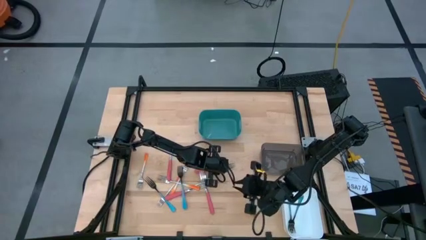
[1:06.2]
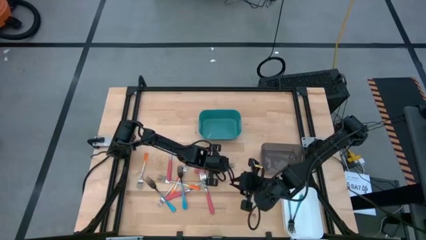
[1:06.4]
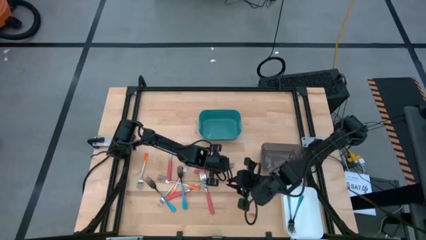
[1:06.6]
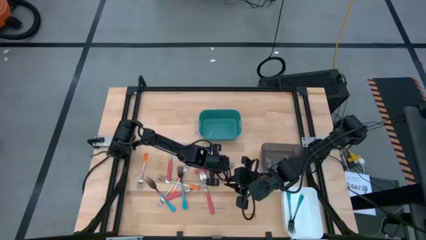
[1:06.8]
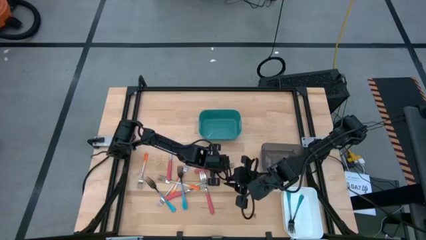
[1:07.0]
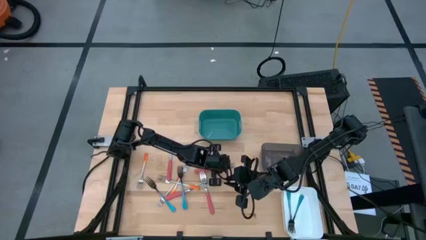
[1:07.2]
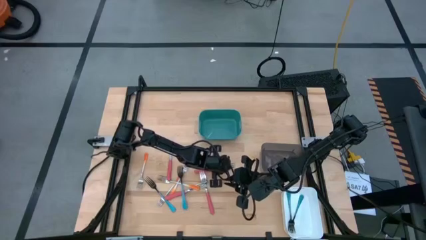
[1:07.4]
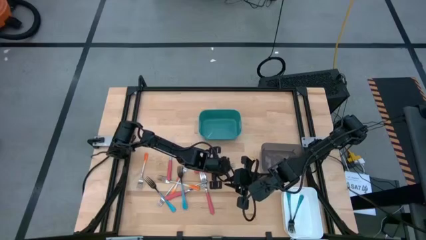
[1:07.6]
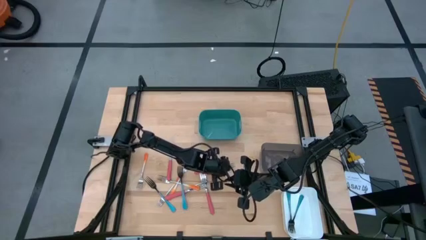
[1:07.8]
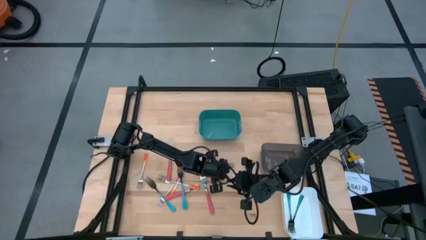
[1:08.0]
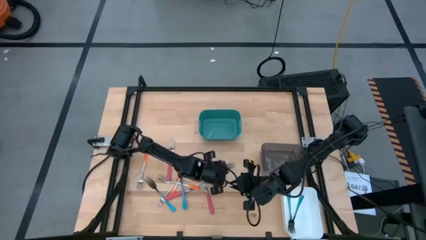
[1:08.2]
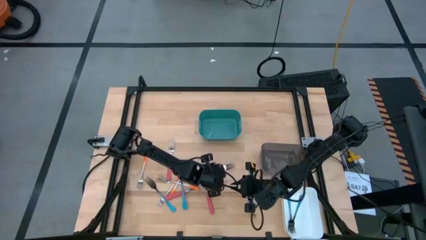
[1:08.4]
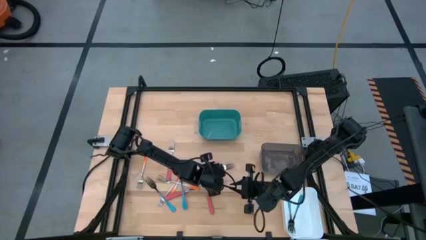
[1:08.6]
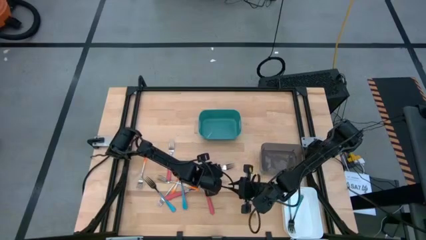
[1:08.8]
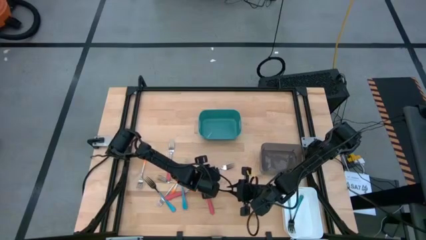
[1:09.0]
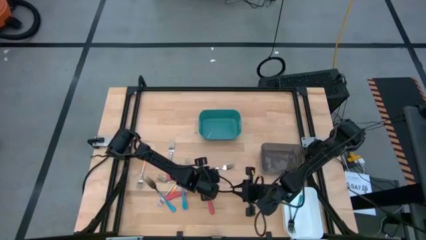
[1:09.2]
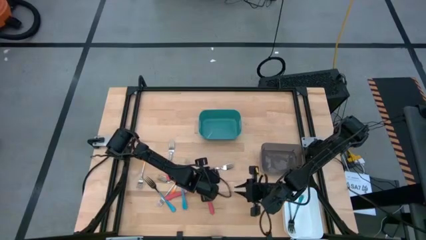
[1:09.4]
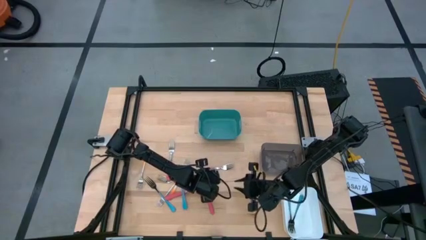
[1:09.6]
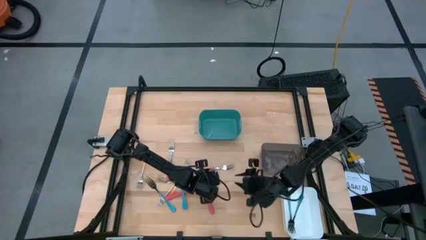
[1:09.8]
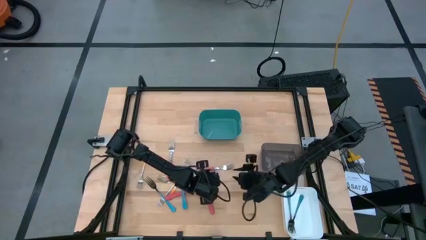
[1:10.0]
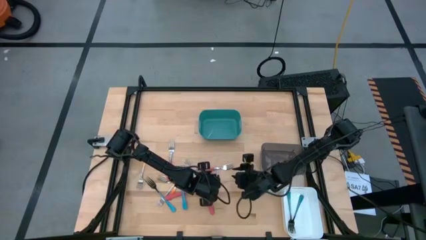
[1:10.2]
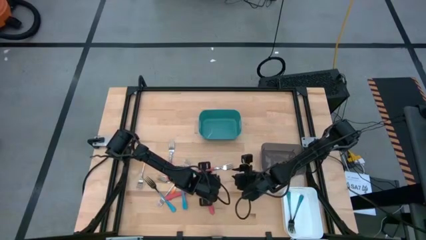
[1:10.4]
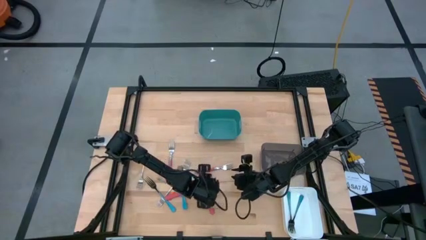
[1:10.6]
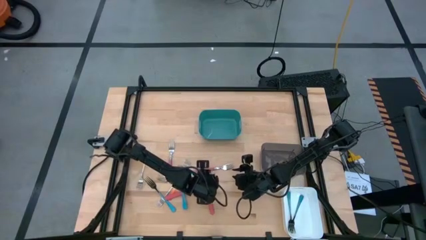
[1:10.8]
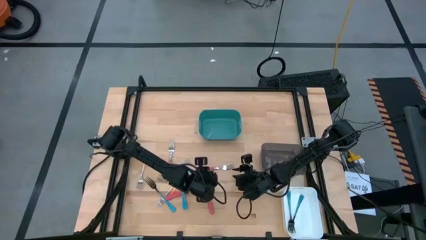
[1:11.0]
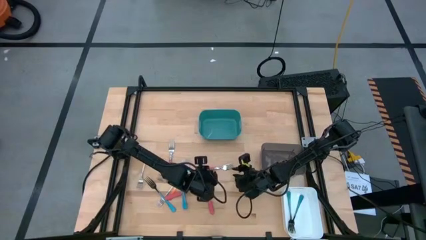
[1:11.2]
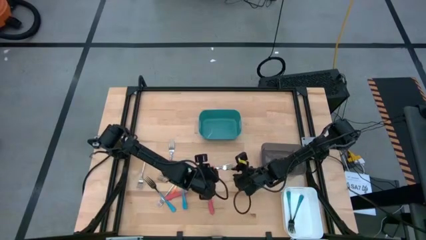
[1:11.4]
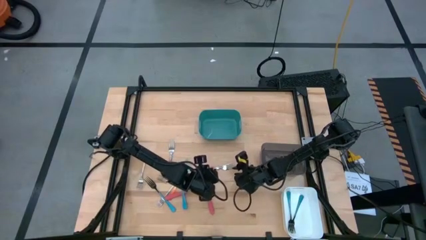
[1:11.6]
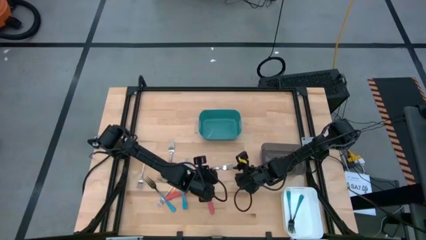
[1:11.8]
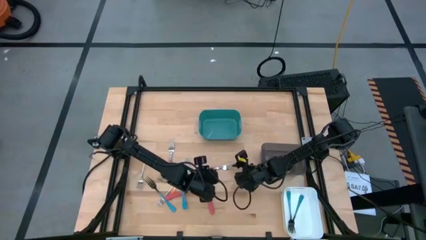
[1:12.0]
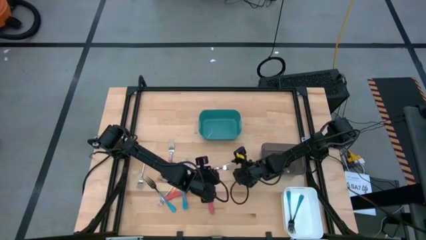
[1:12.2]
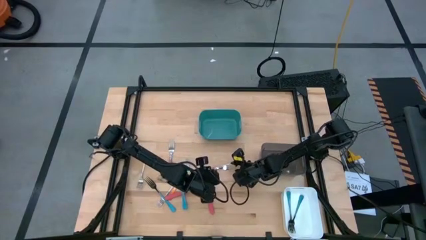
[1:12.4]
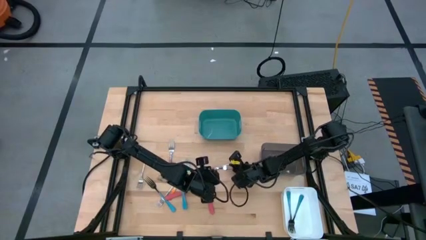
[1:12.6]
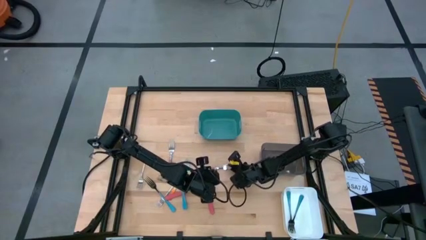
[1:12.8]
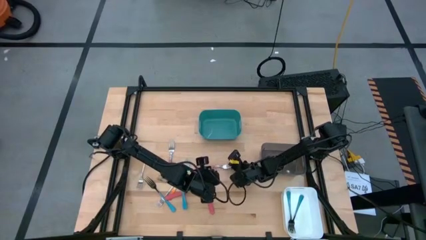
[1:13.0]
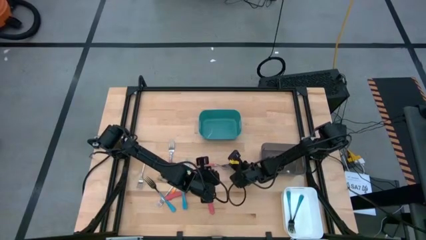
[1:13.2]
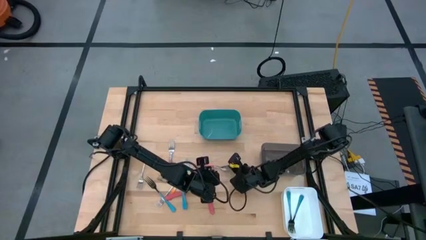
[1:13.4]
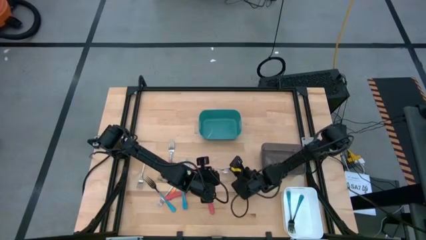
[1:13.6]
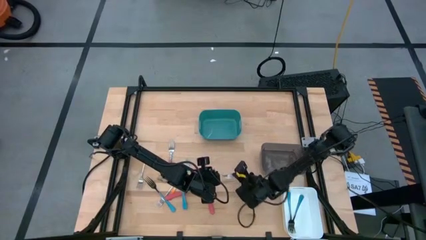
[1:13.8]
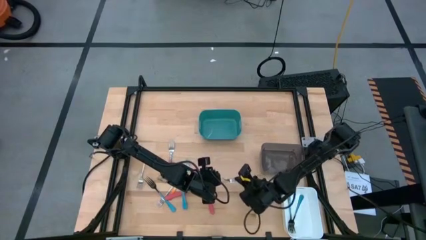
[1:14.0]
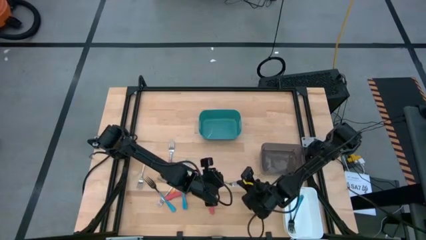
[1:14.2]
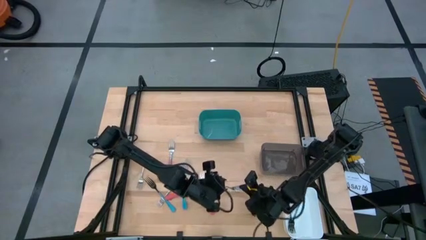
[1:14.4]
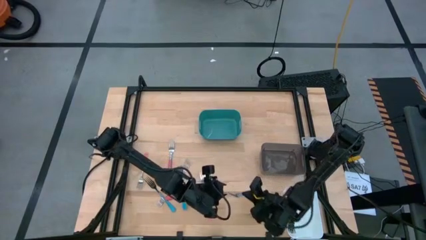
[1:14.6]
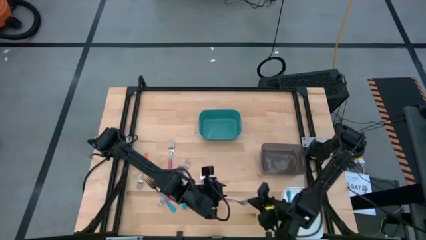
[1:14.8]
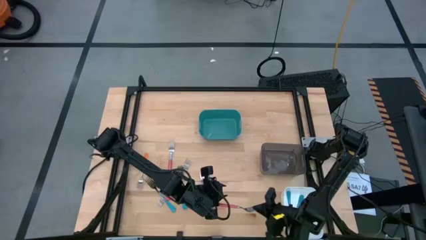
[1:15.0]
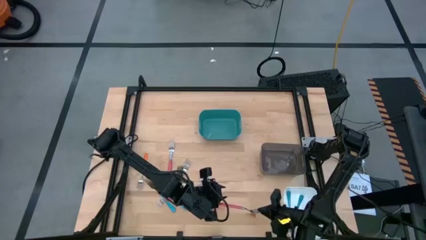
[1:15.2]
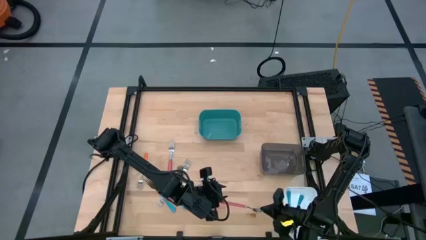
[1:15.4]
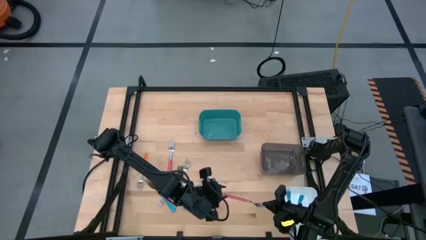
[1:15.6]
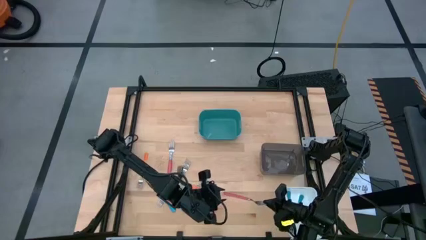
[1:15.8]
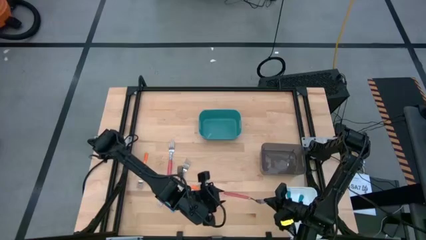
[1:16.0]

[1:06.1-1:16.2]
Task: Sort silverware by color (type)
Put the pink fork into the black bin
